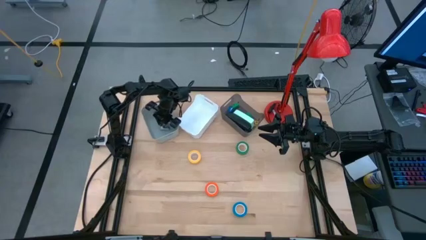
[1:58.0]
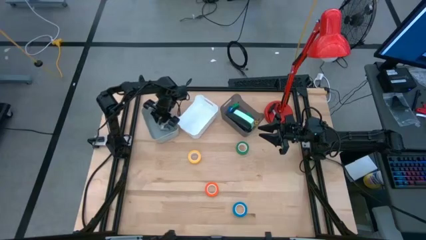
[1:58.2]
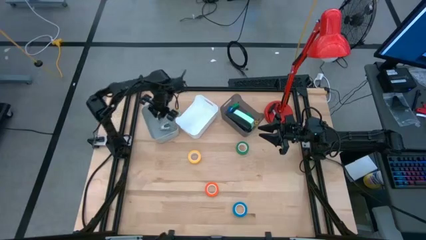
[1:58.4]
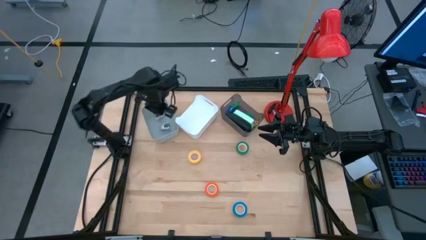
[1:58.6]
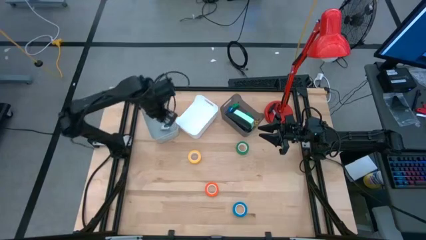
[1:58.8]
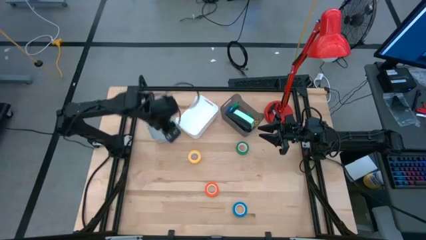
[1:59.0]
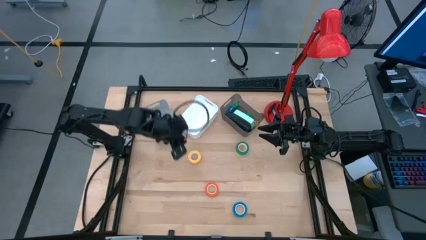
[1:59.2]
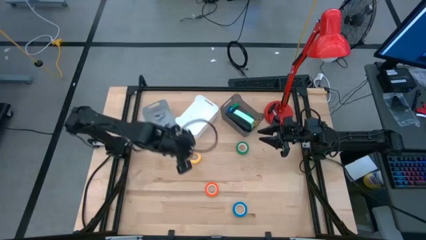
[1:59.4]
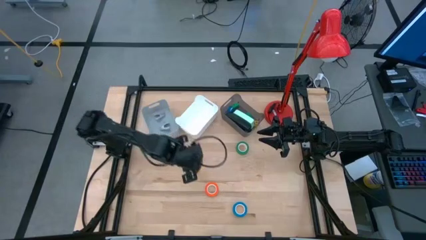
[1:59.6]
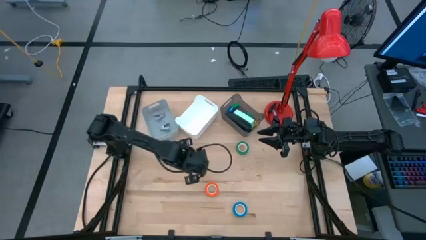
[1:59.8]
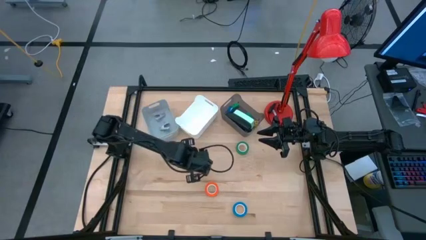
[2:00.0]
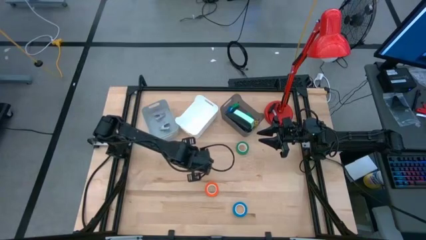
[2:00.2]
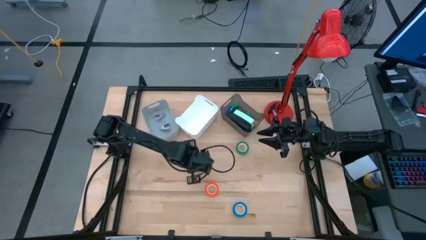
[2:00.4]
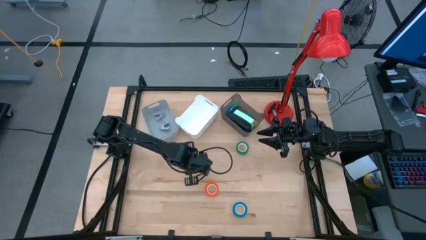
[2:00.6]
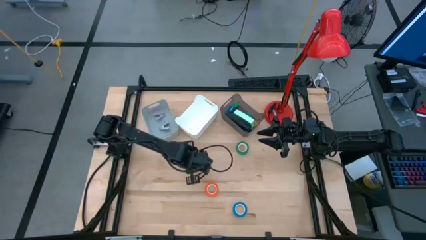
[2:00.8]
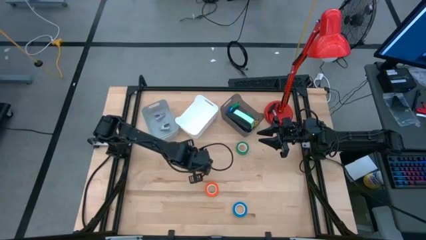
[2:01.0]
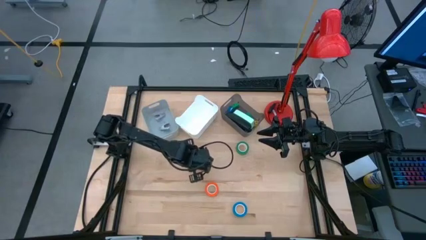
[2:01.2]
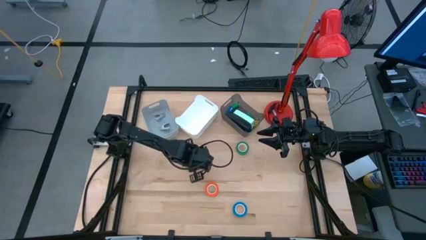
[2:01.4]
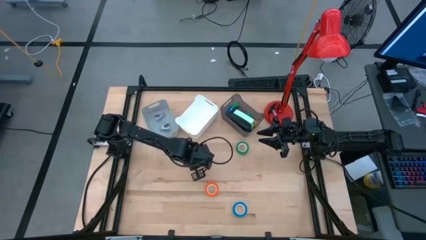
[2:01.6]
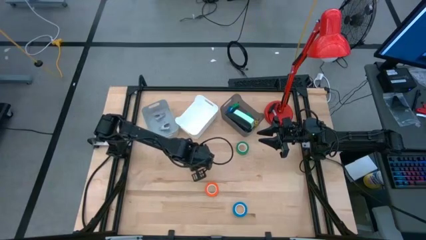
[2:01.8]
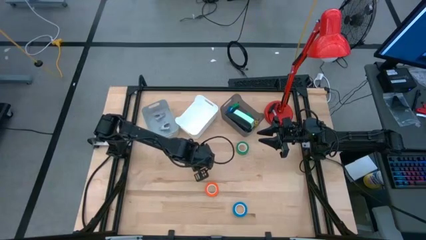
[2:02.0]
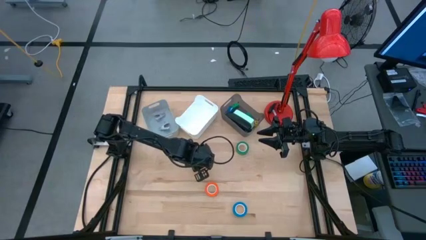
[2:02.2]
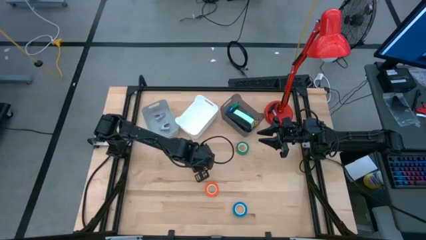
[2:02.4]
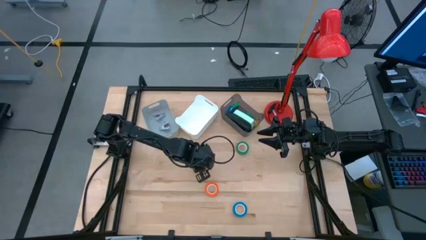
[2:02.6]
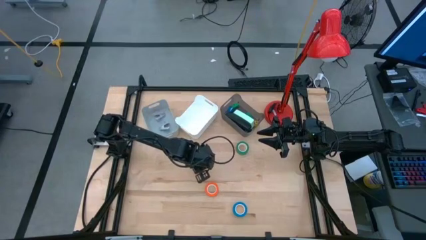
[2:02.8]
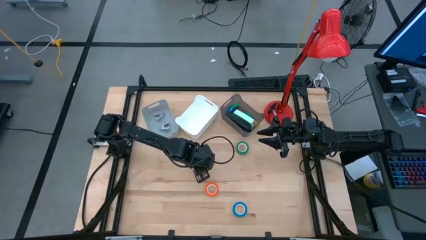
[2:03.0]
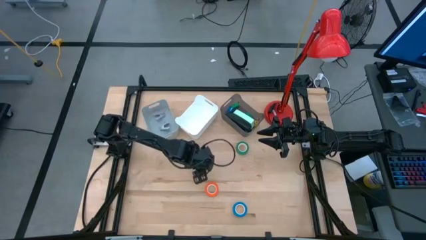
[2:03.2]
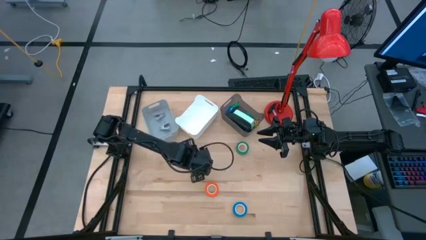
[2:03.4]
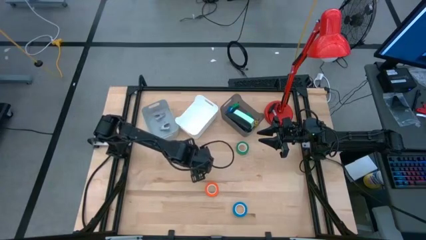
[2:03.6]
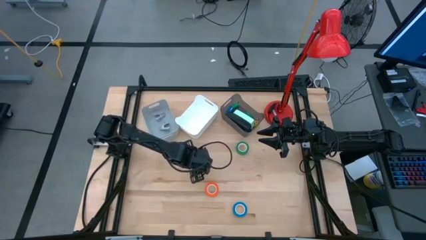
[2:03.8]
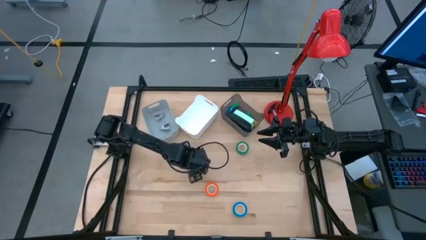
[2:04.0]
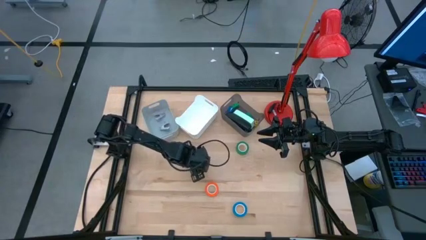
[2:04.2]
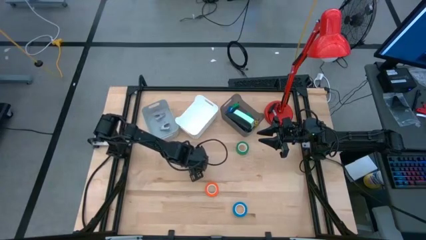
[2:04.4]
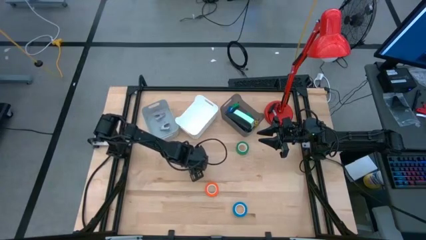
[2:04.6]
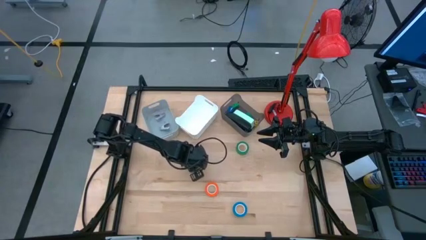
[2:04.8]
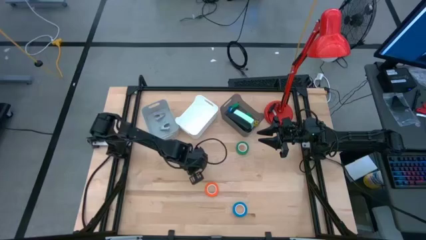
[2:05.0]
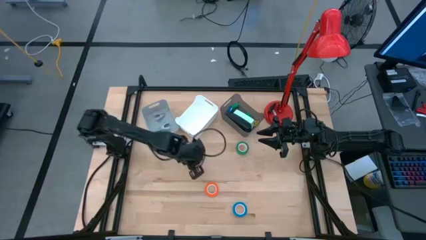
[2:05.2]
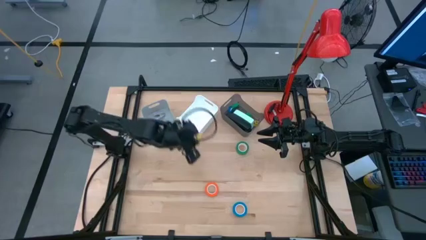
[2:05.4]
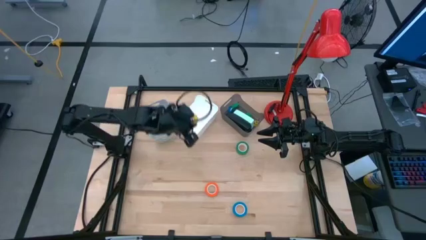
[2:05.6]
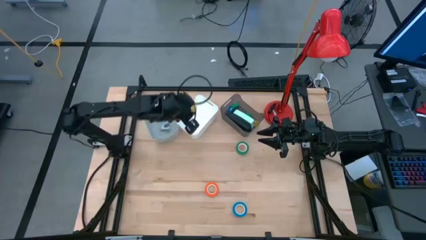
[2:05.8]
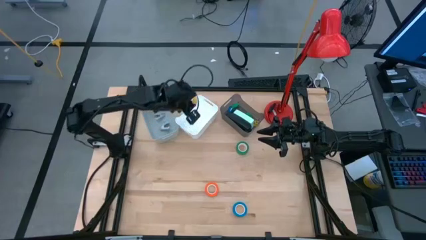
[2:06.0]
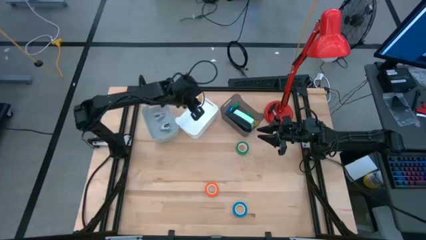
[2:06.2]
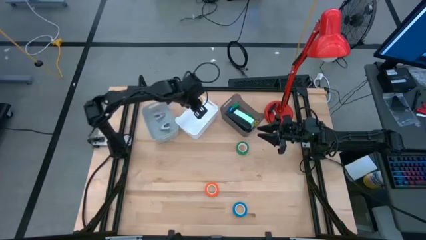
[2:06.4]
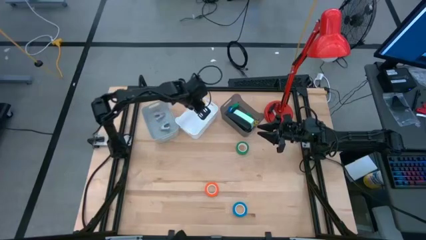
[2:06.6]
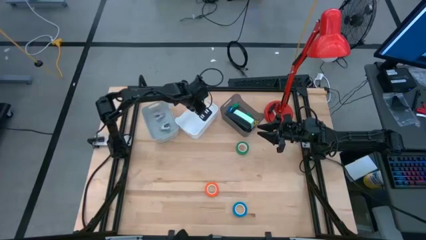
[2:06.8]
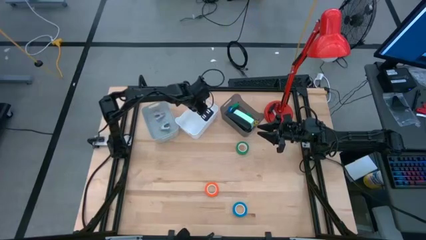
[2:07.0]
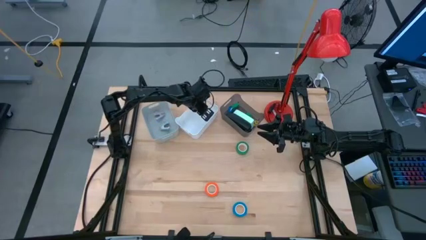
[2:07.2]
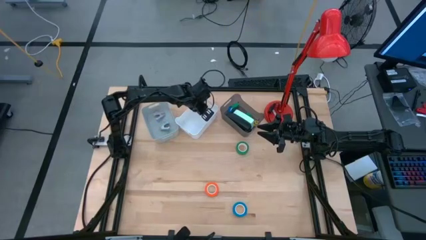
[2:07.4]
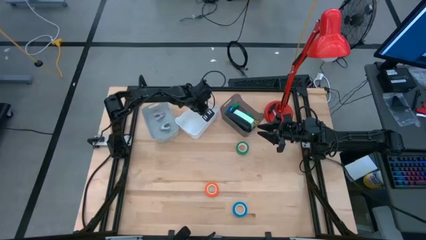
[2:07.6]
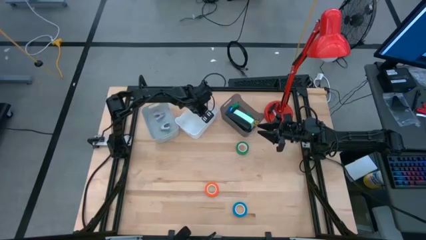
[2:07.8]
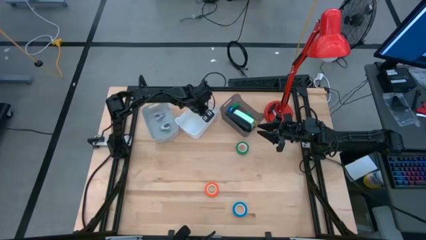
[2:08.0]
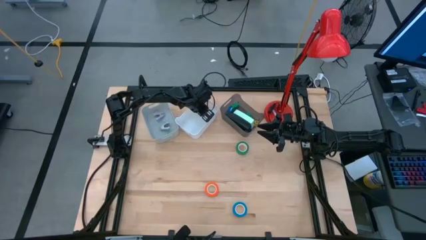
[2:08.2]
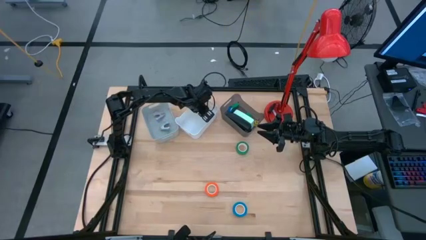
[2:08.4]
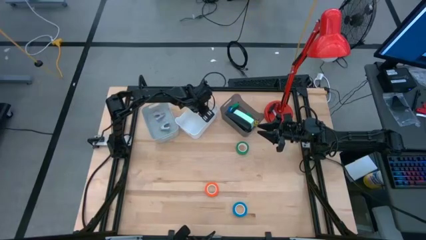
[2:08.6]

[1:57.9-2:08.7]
Task: Pick and place Stapler, Stapler remover, tape
Put the yellow tape into the white bin

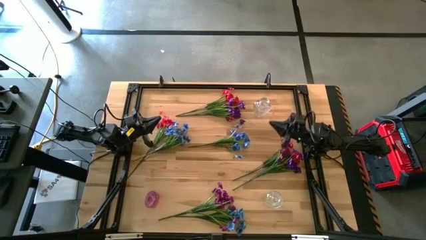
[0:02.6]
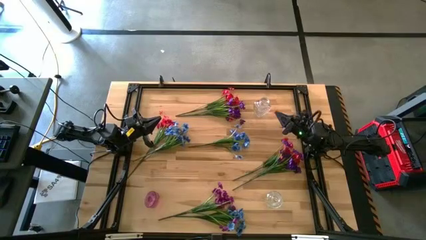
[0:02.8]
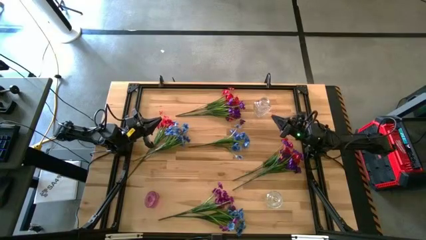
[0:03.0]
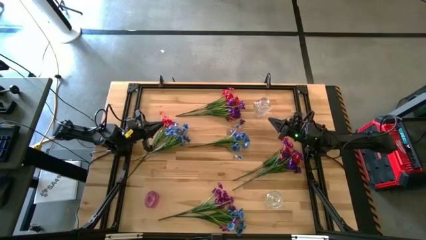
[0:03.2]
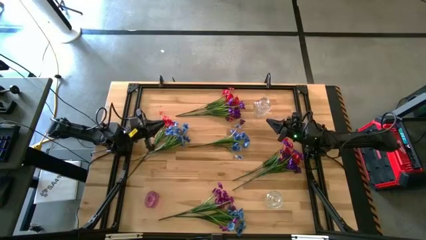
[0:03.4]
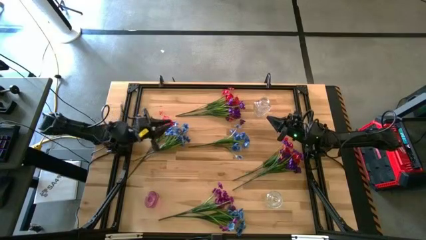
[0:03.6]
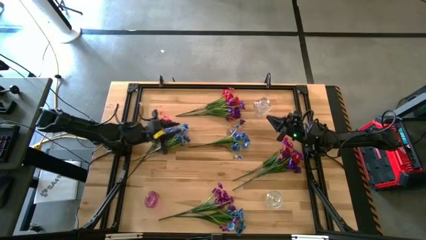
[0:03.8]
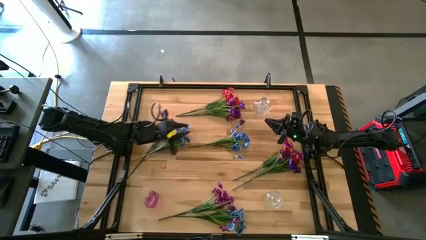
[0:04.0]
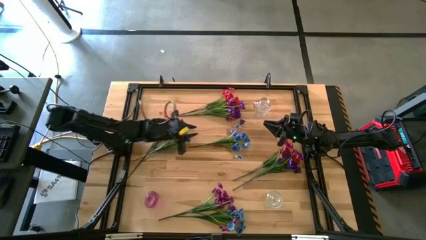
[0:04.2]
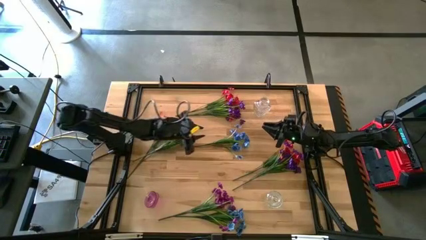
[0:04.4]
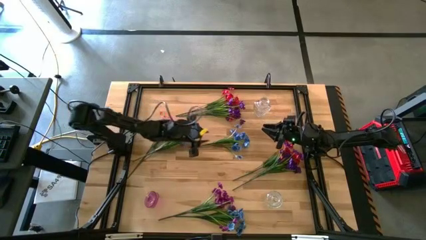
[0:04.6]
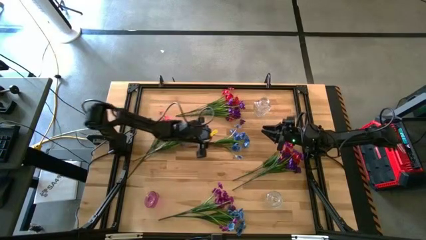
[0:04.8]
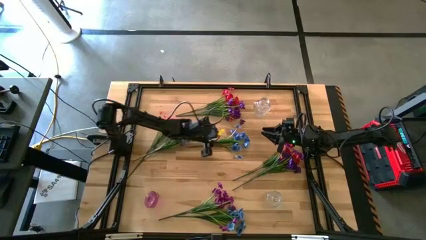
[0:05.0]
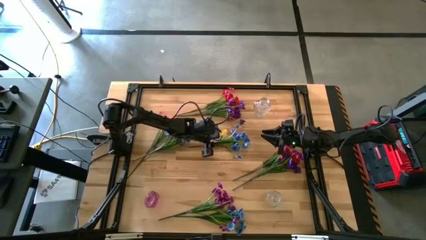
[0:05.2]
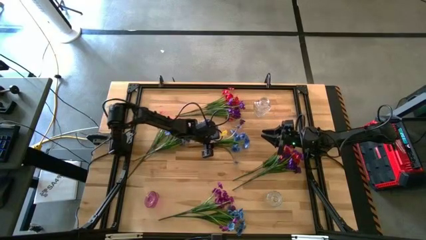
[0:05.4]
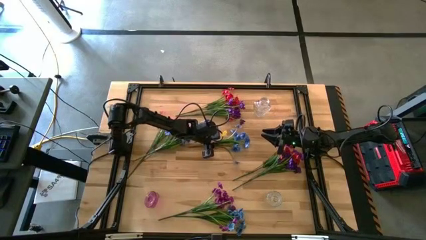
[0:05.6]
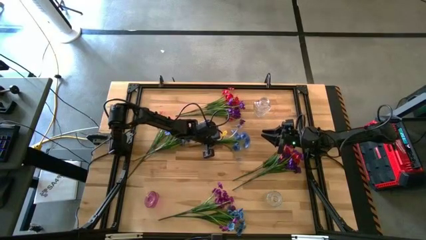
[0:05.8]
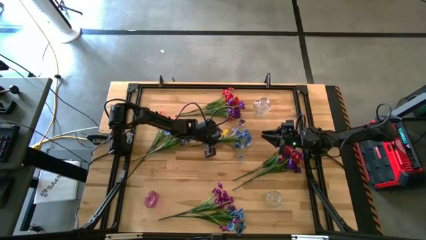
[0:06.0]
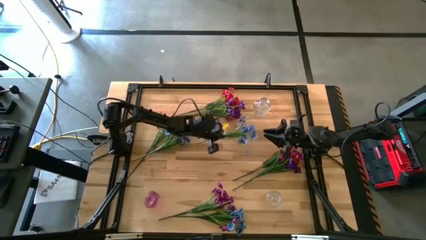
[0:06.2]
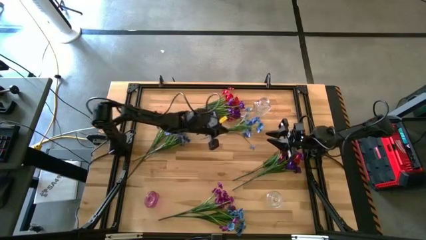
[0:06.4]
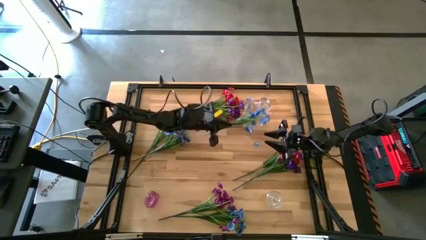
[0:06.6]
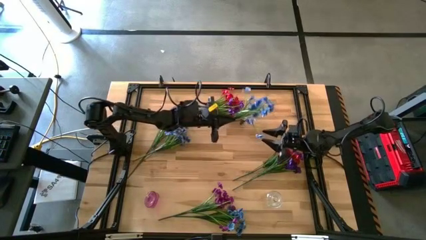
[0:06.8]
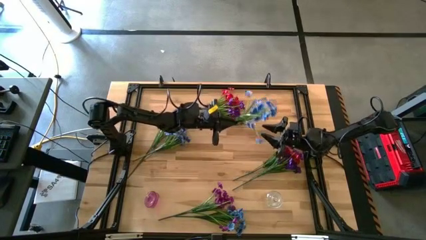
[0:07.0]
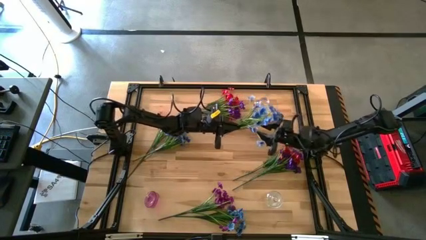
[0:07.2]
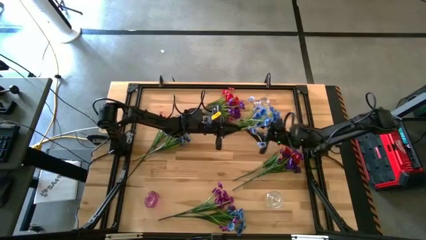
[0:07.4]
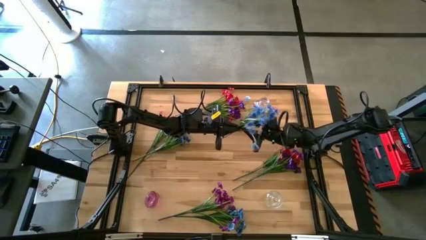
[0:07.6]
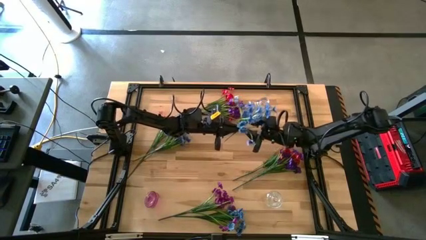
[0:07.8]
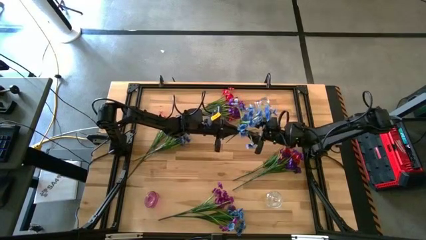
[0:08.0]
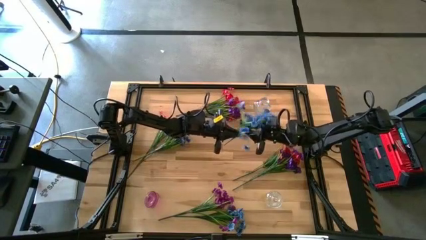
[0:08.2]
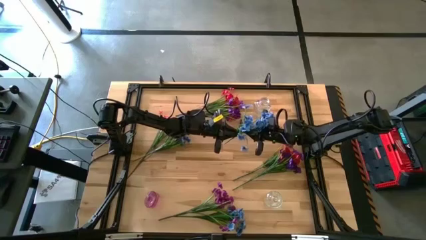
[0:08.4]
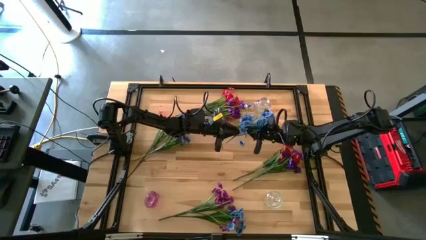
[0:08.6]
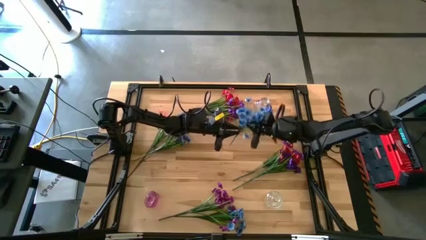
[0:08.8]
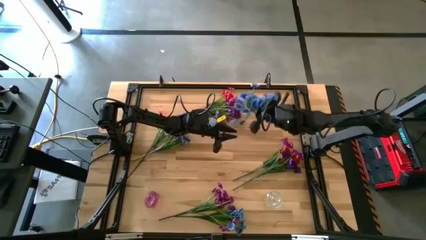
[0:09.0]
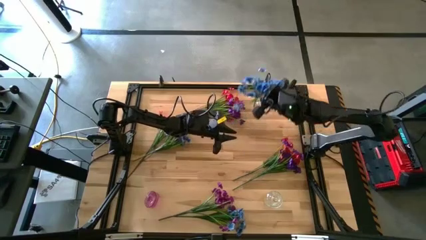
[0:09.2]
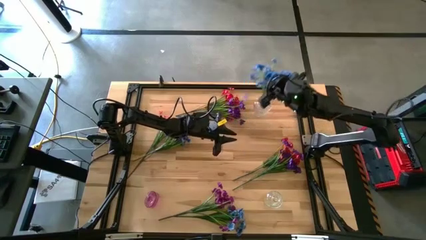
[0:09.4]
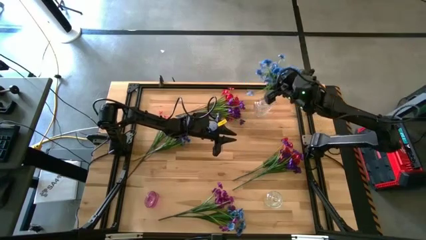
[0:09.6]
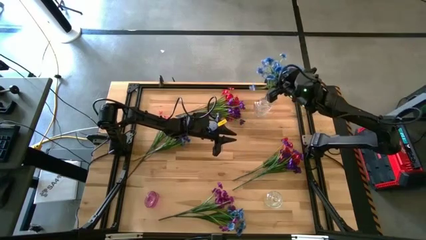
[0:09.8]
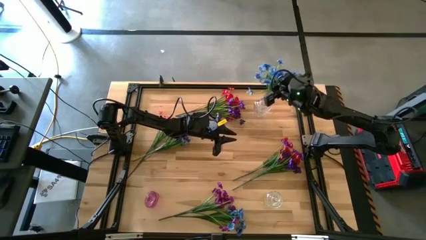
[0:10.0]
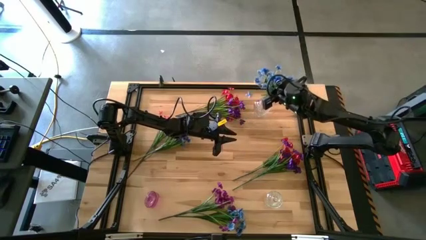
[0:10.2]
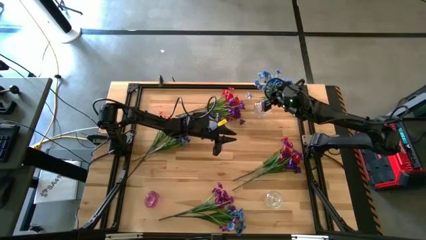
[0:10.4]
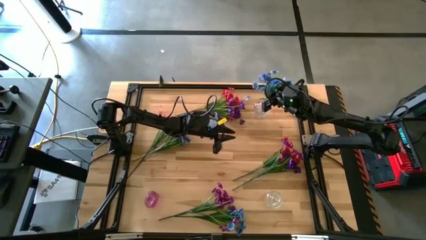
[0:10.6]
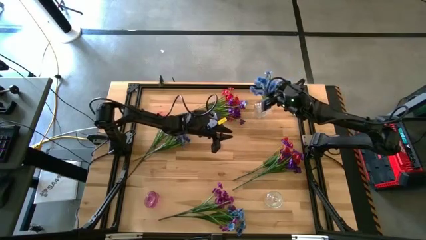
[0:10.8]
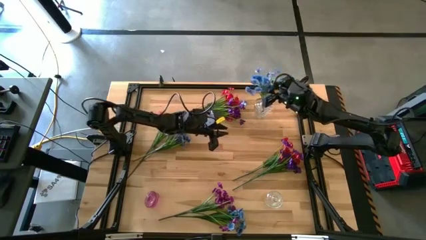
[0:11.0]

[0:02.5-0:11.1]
Task: Sort flowers into vase by color
Put the top right blue flower into the top transparent flower vase
